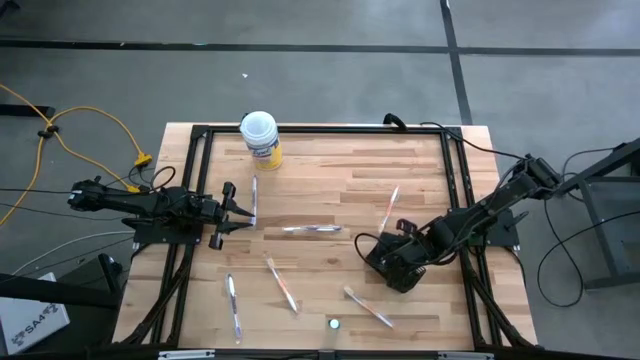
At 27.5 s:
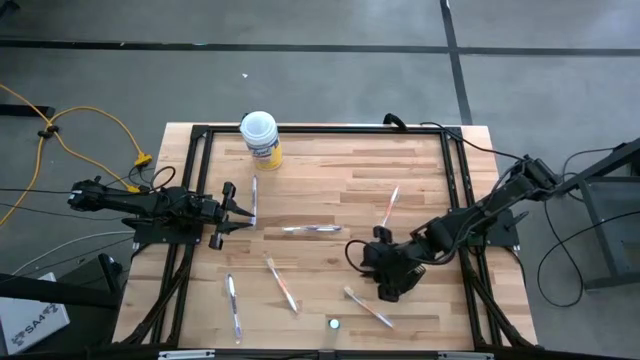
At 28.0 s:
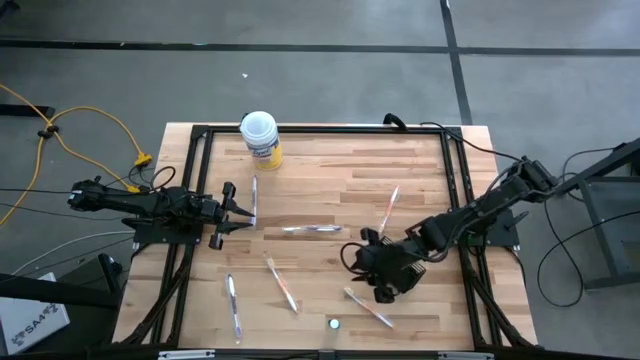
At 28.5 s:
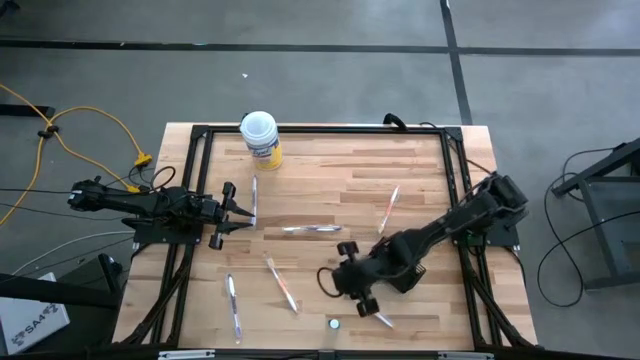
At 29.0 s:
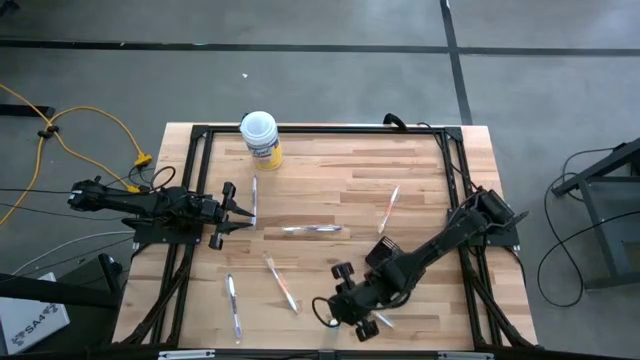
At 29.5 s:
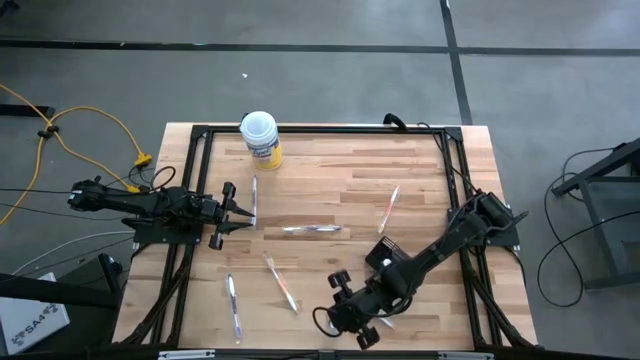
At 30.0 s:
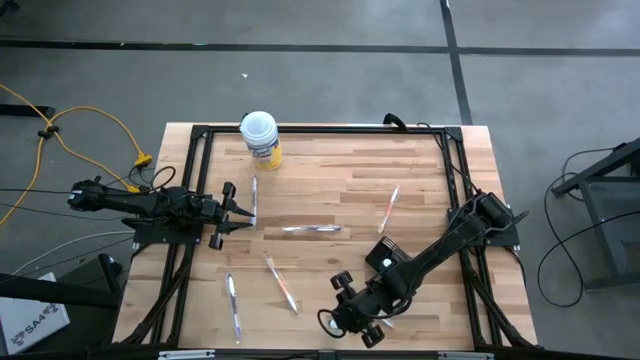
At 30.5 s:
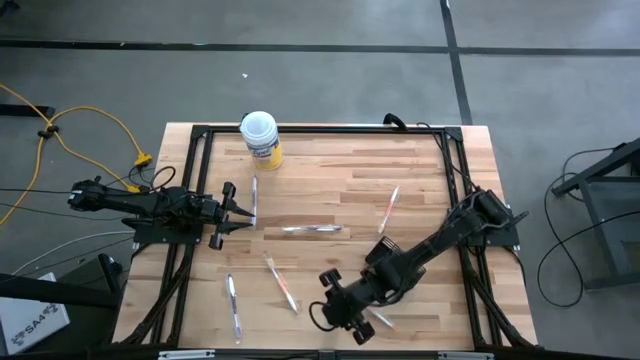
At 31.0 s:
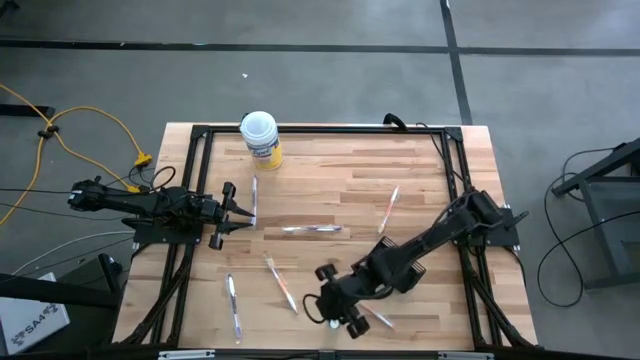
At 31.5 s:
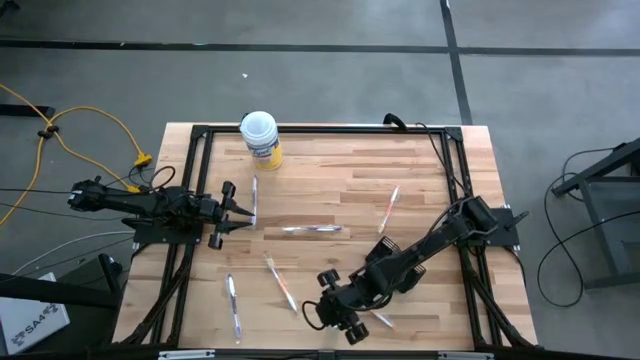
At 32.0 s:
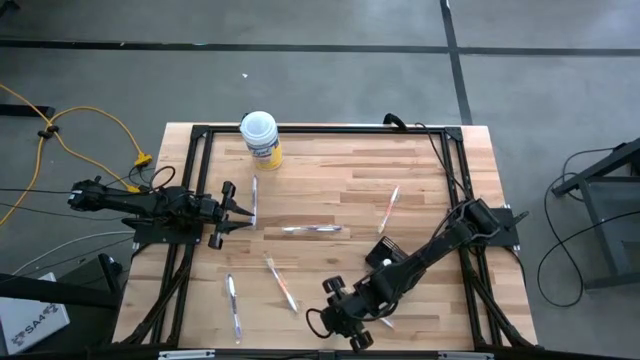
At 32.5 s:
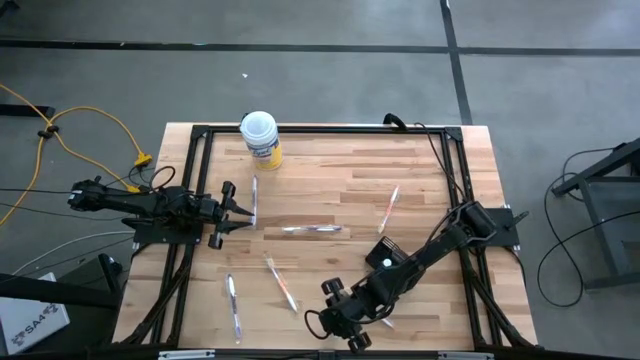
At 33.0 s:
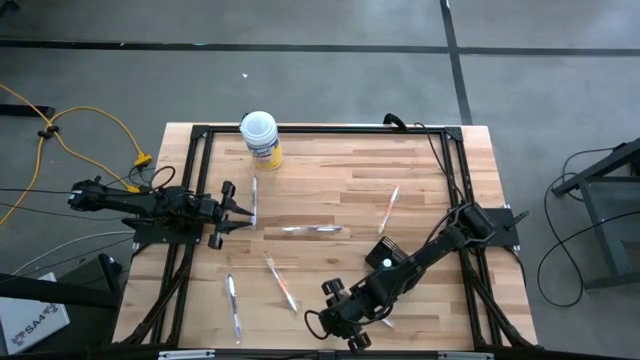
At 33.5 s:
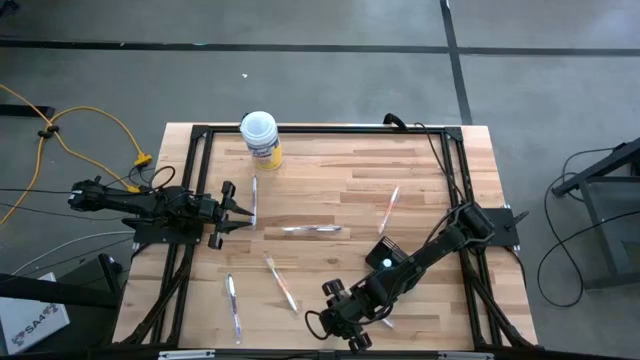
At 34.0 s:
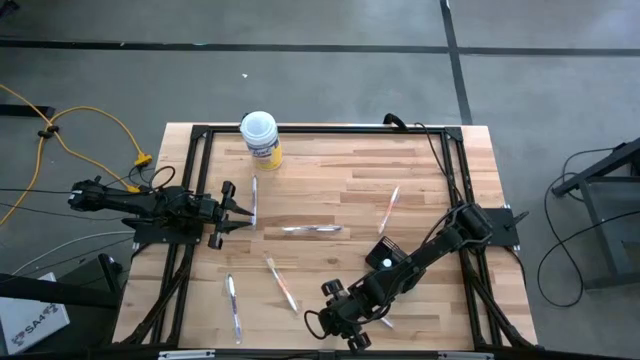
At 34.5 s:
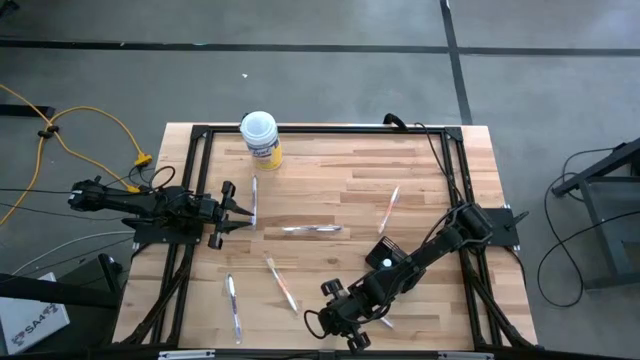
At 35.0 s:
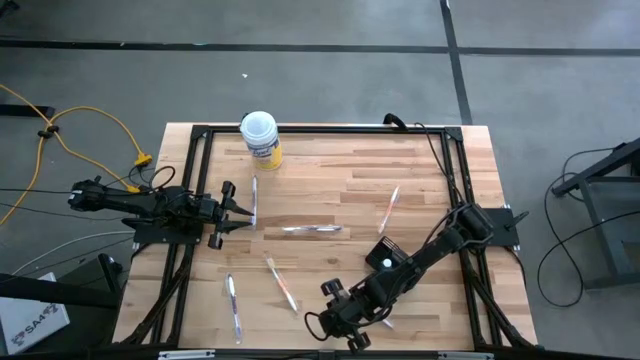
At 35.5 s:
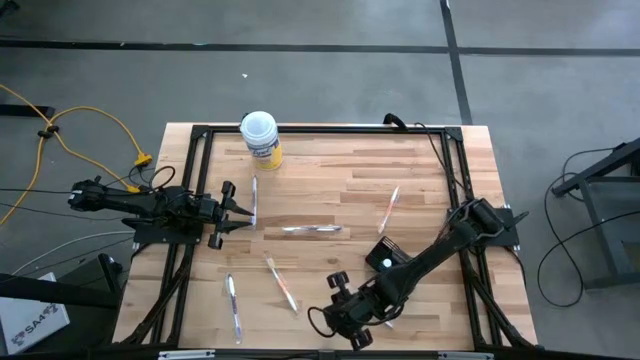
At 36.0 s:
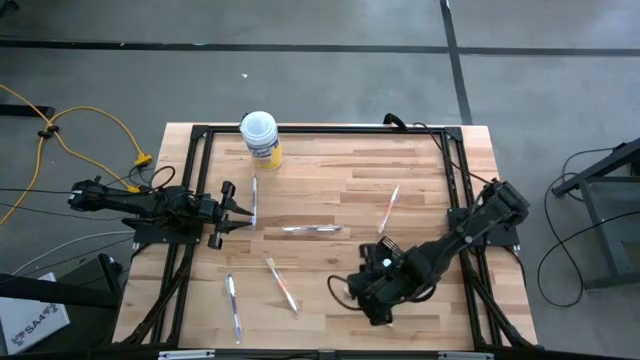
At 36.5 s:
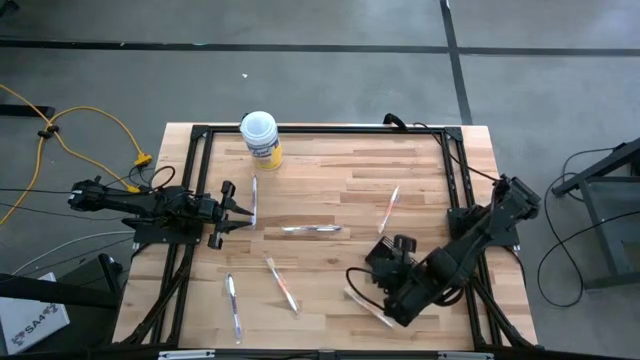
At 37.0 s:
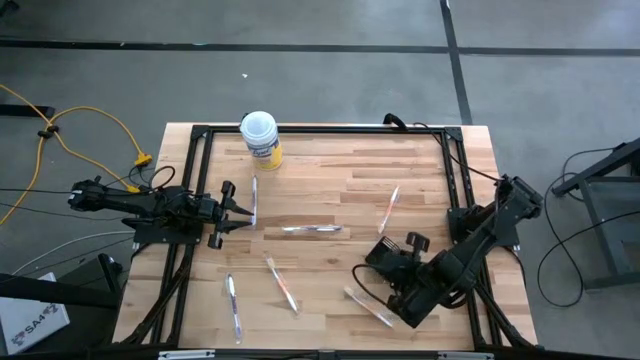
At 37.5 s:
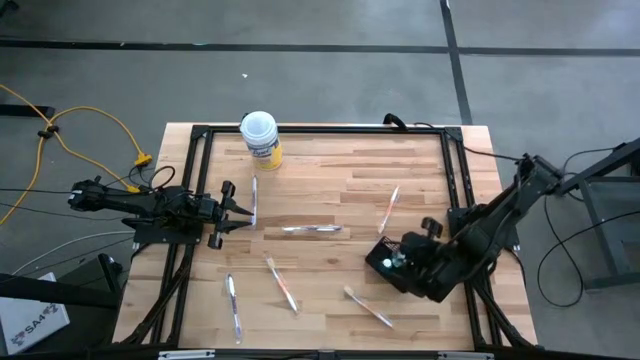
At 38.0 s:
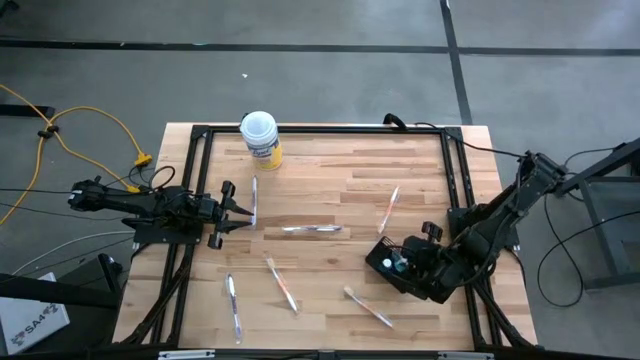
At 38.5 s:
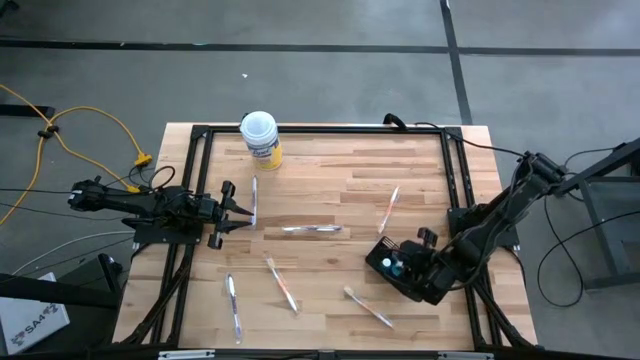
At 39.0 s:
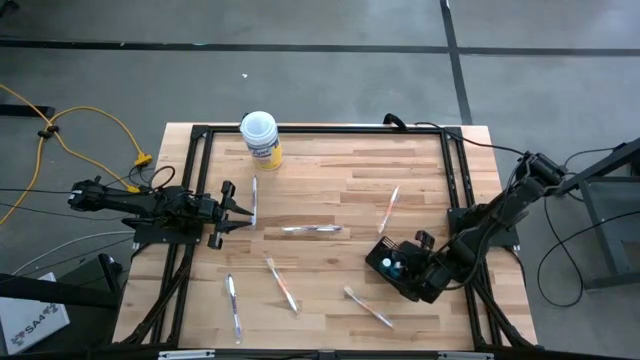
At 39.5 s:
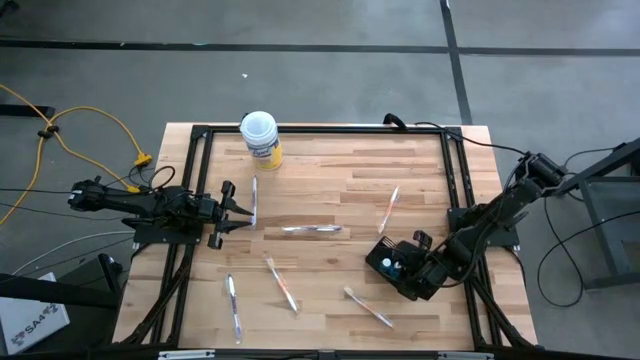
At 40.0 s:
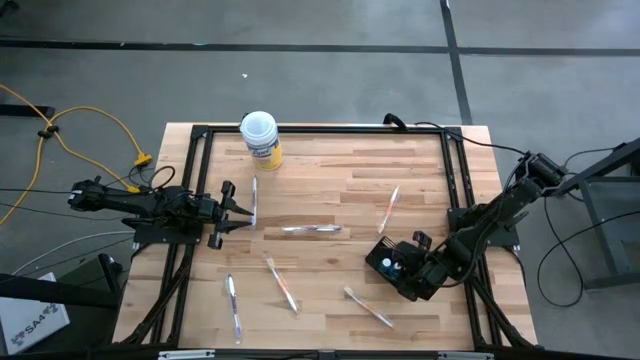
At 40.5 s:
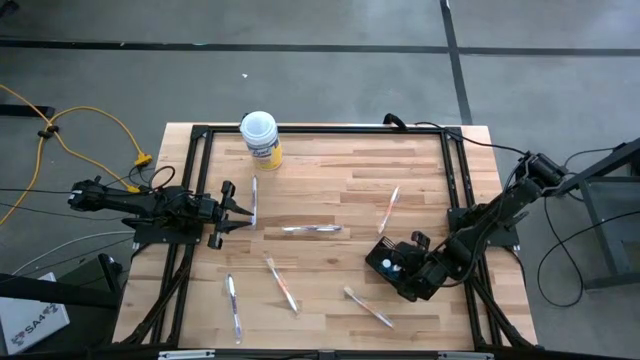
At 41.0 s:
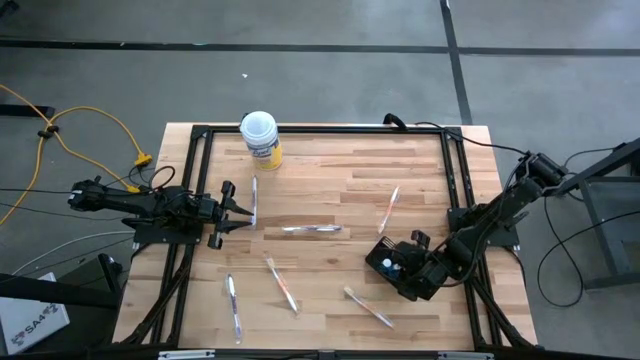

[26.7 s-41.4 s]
Task: Pick & Place toothbrushing station
Put the blue mouthwash into the wire organizer
